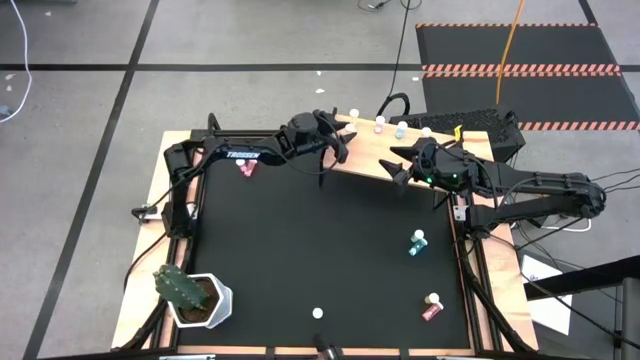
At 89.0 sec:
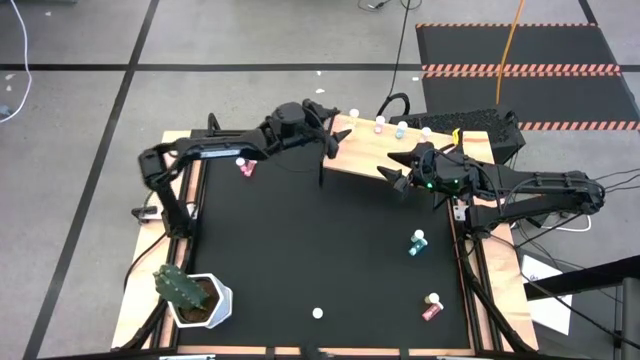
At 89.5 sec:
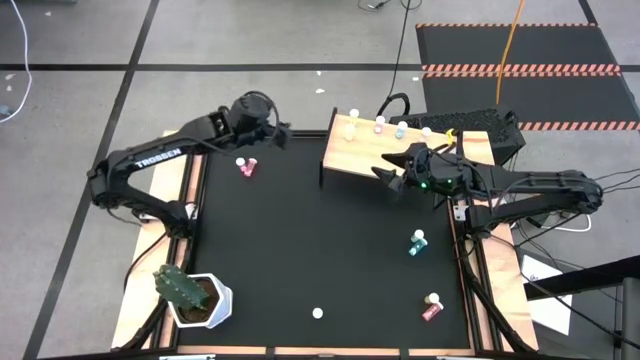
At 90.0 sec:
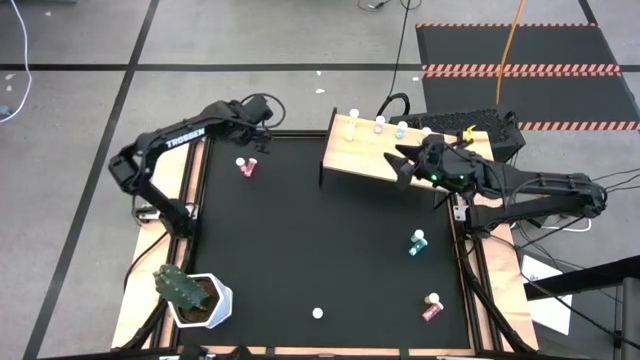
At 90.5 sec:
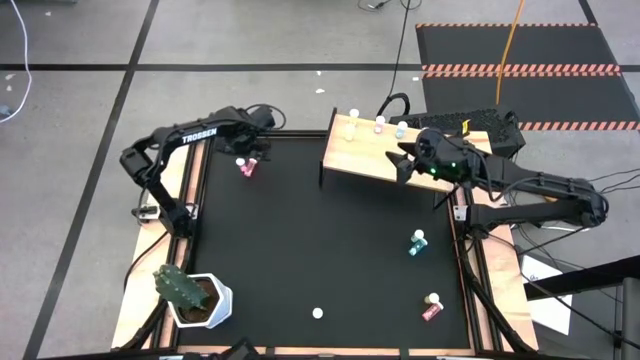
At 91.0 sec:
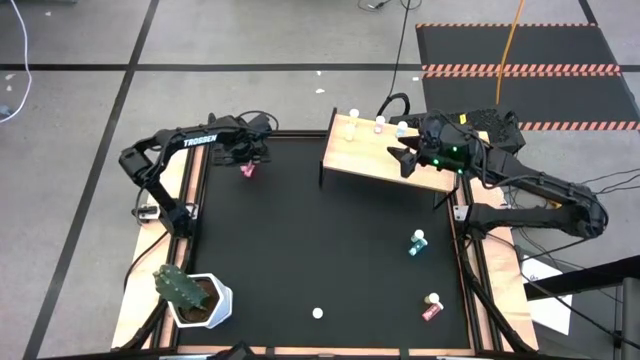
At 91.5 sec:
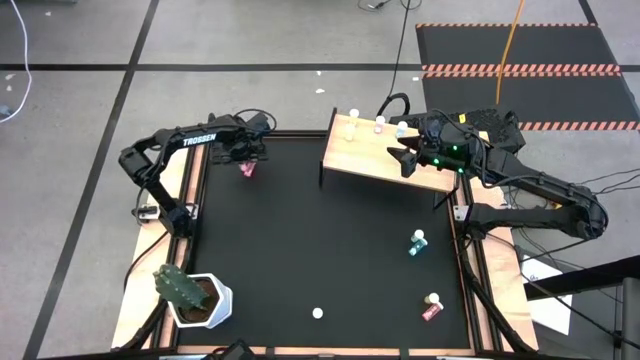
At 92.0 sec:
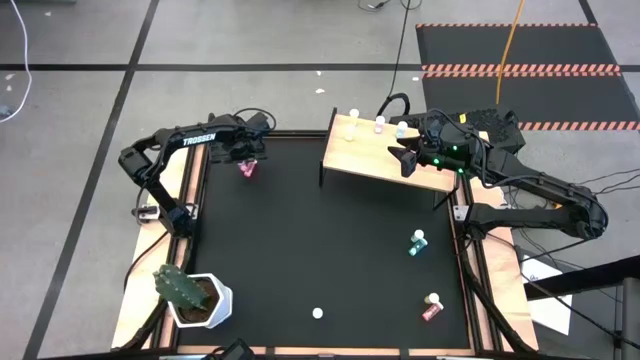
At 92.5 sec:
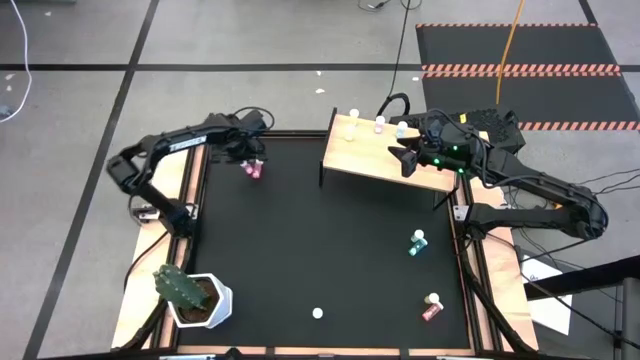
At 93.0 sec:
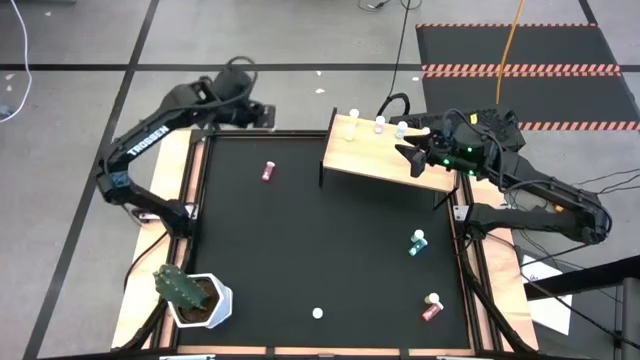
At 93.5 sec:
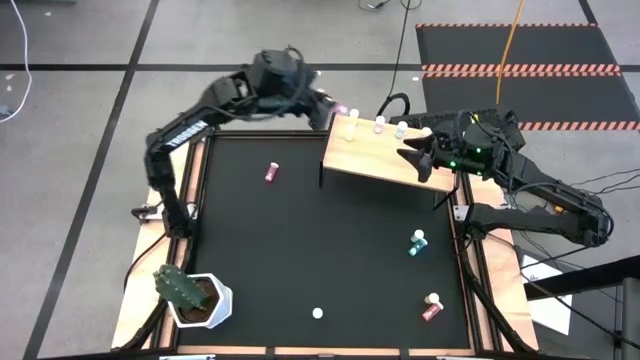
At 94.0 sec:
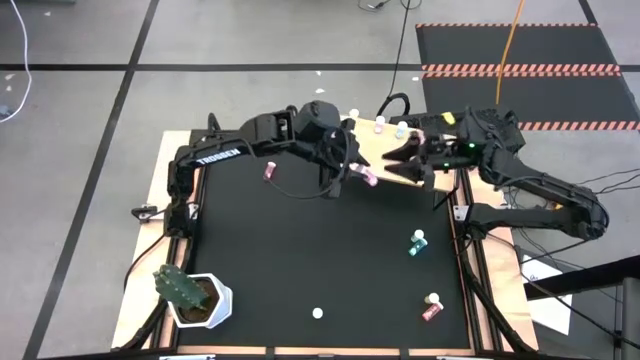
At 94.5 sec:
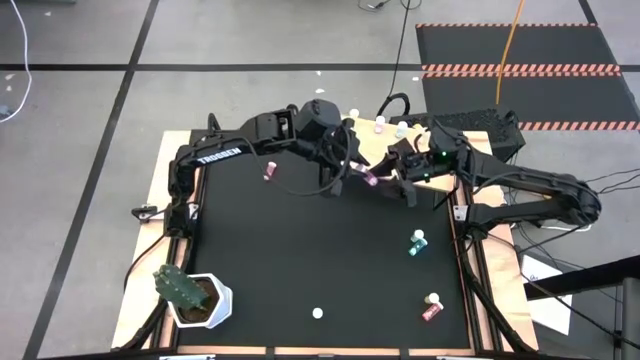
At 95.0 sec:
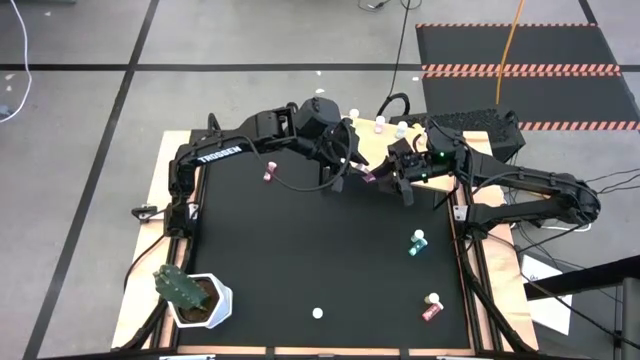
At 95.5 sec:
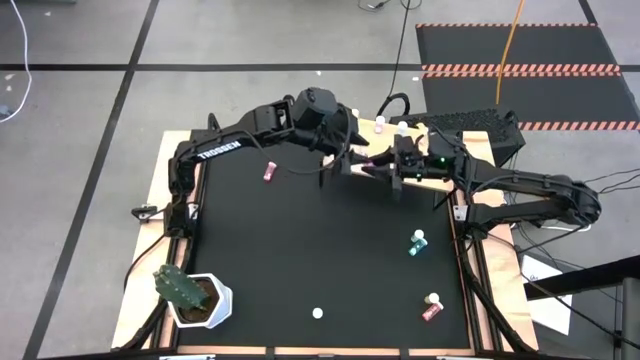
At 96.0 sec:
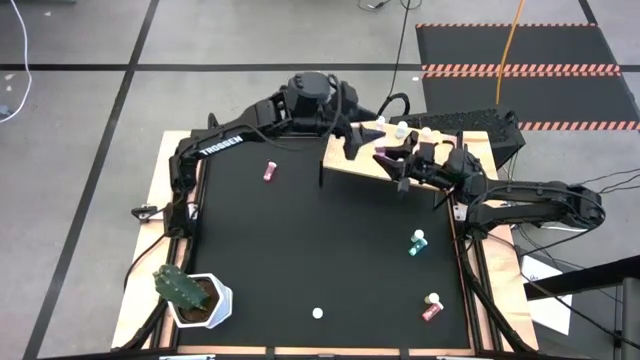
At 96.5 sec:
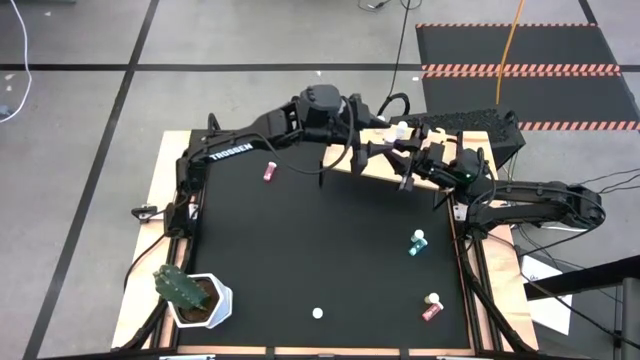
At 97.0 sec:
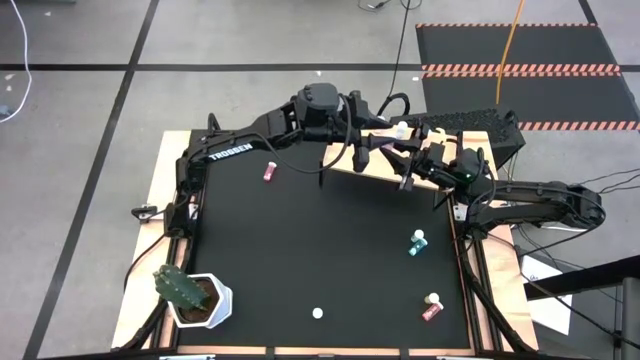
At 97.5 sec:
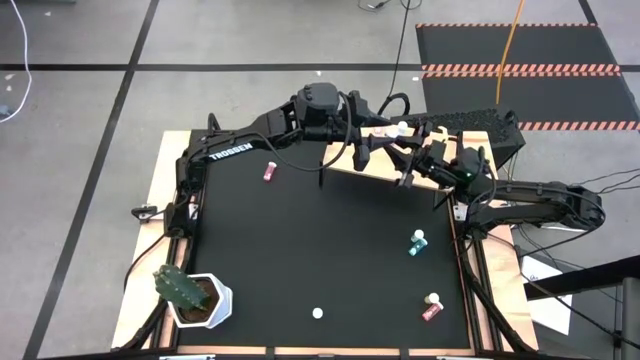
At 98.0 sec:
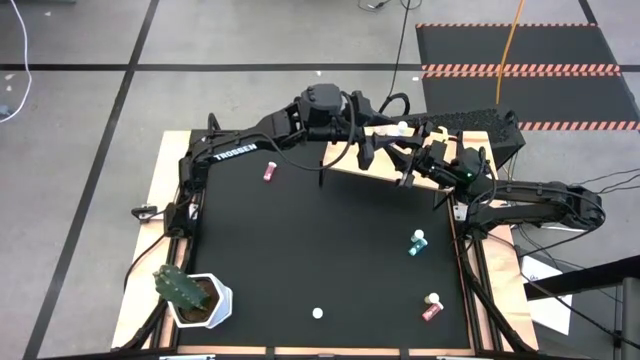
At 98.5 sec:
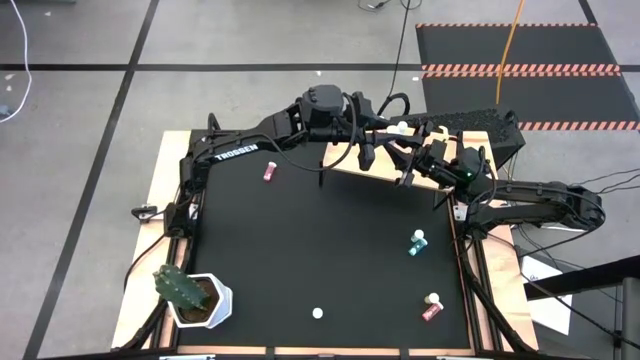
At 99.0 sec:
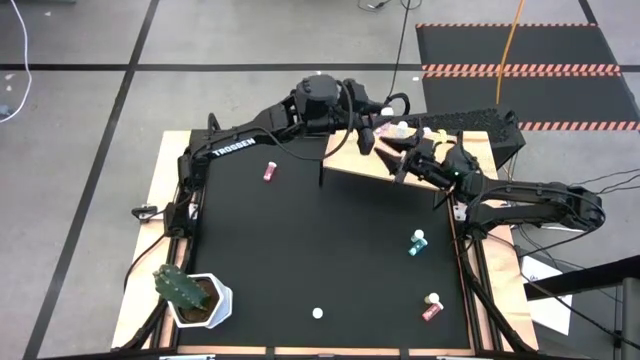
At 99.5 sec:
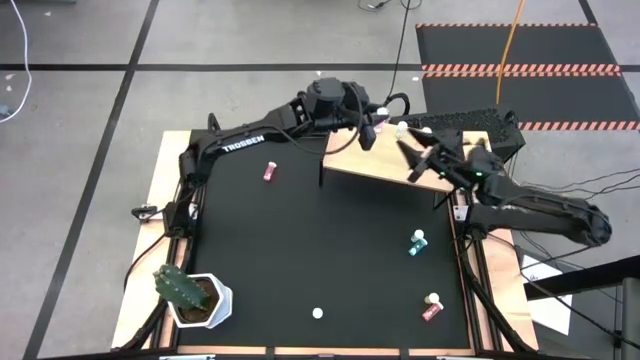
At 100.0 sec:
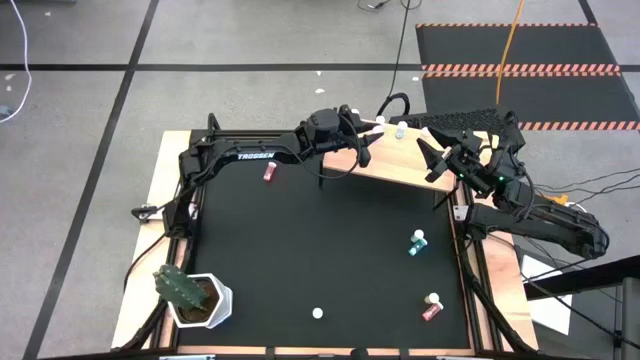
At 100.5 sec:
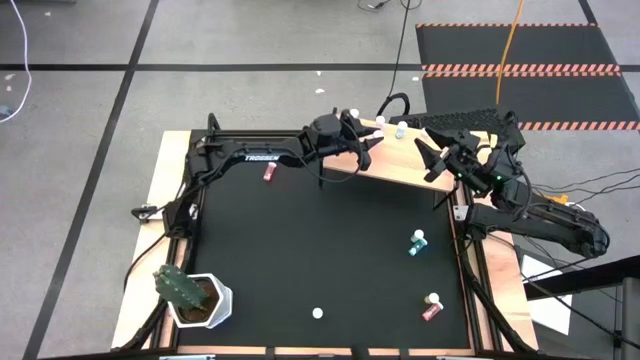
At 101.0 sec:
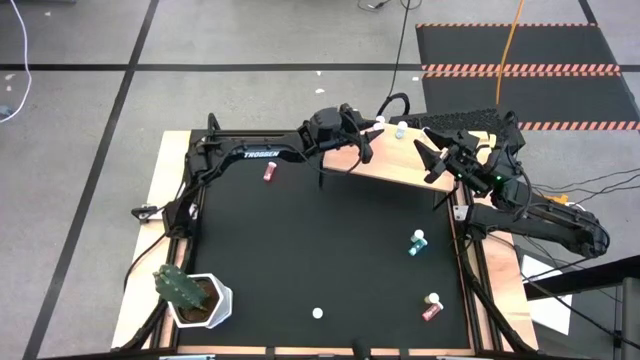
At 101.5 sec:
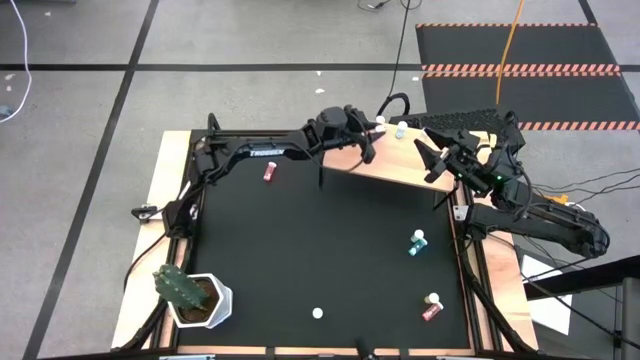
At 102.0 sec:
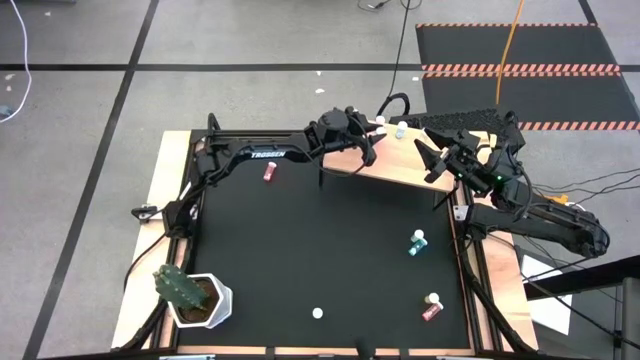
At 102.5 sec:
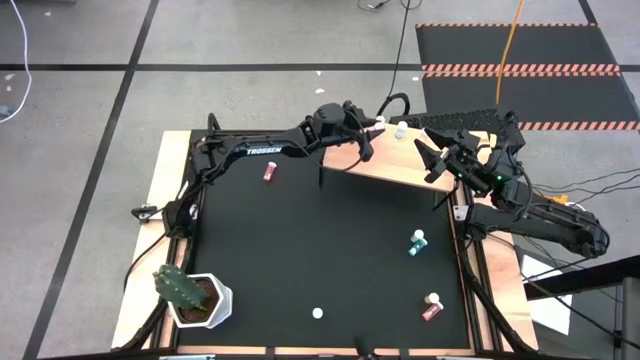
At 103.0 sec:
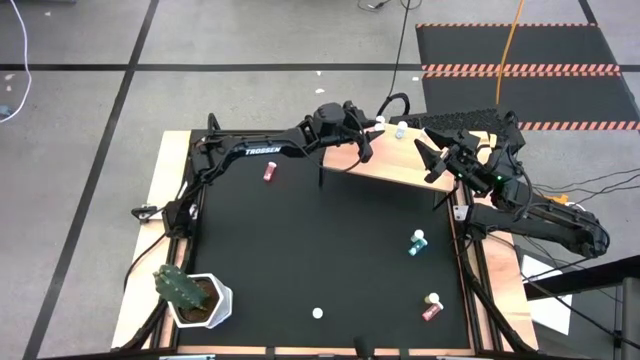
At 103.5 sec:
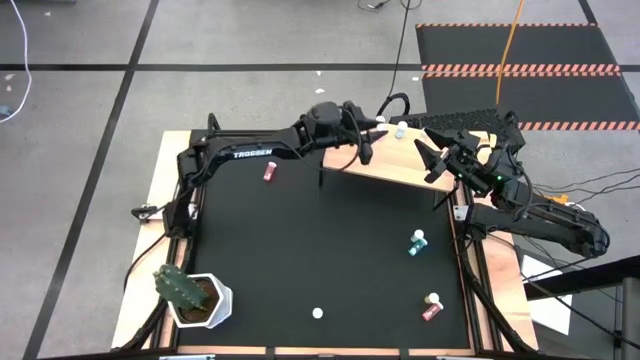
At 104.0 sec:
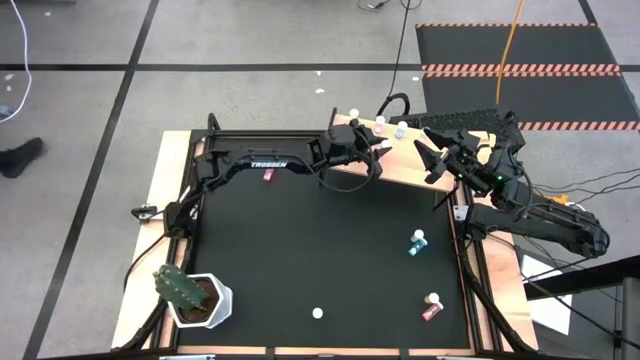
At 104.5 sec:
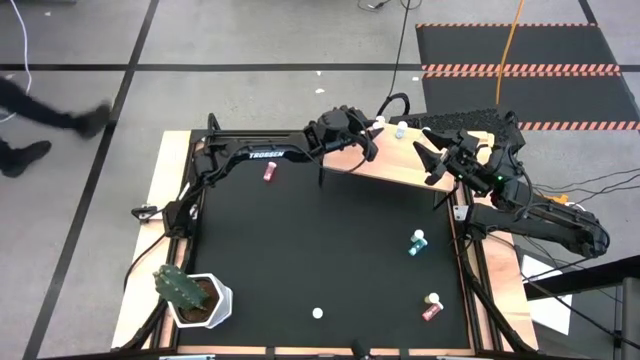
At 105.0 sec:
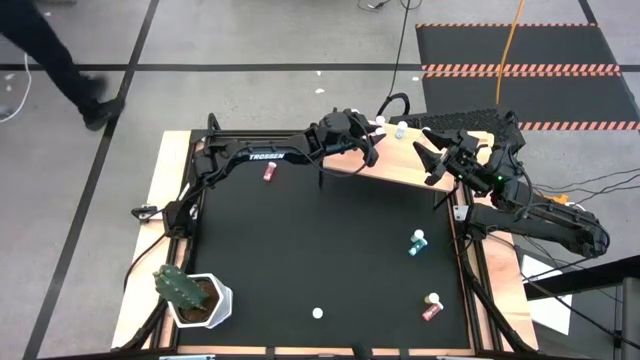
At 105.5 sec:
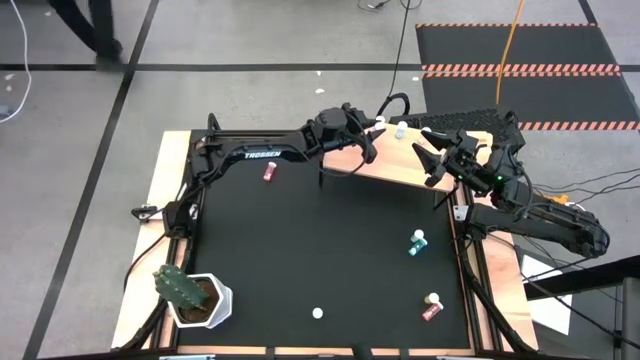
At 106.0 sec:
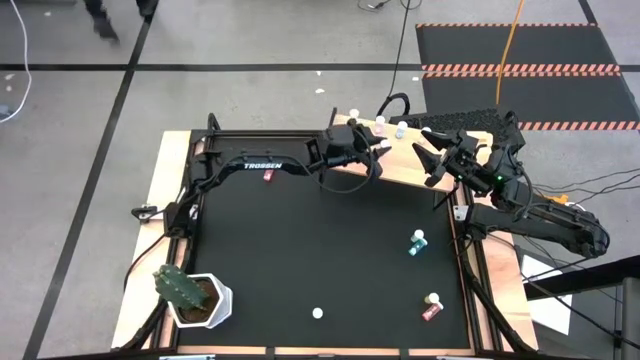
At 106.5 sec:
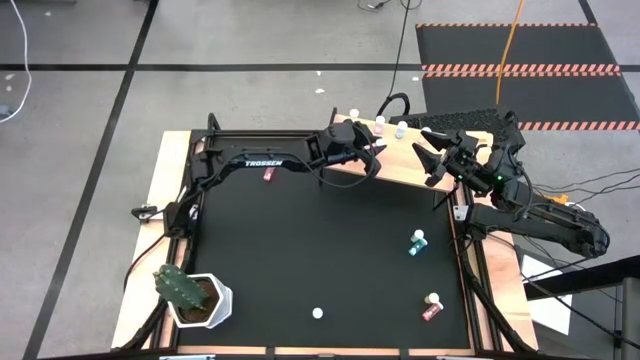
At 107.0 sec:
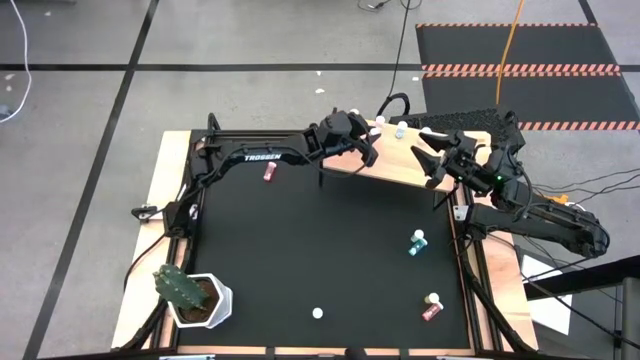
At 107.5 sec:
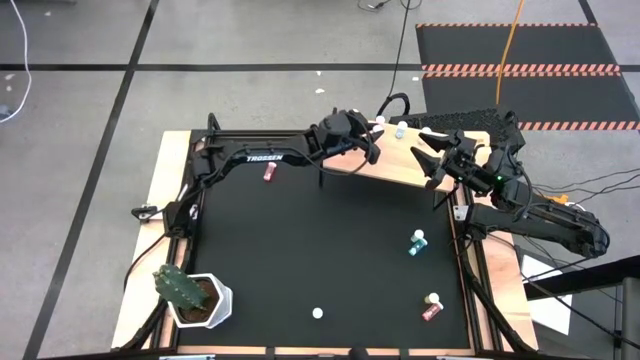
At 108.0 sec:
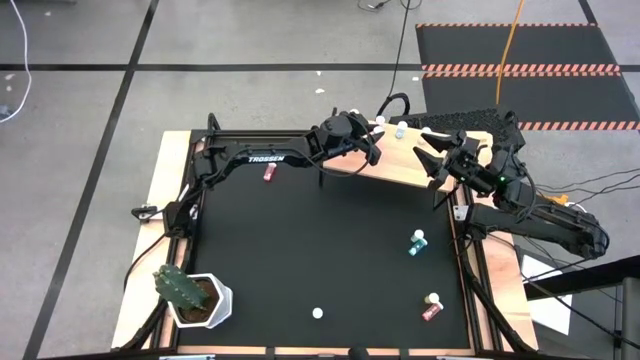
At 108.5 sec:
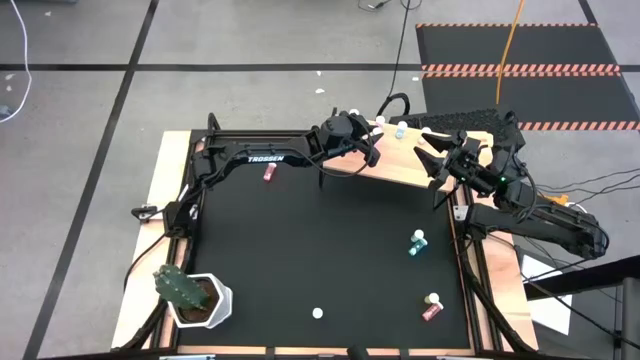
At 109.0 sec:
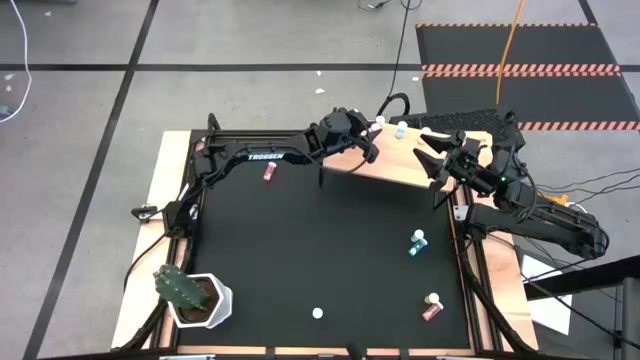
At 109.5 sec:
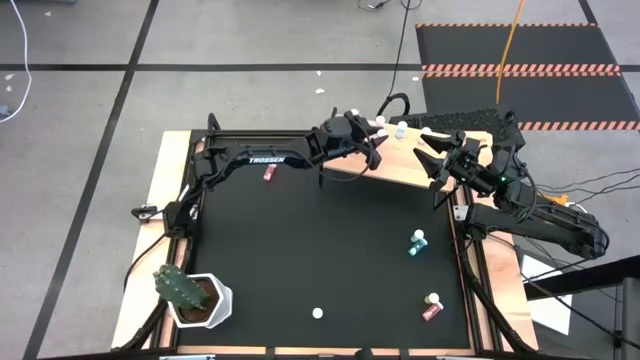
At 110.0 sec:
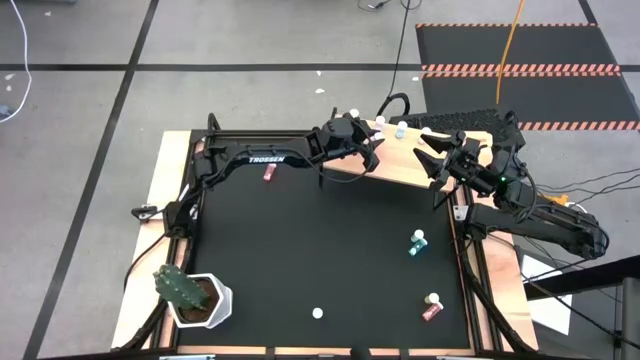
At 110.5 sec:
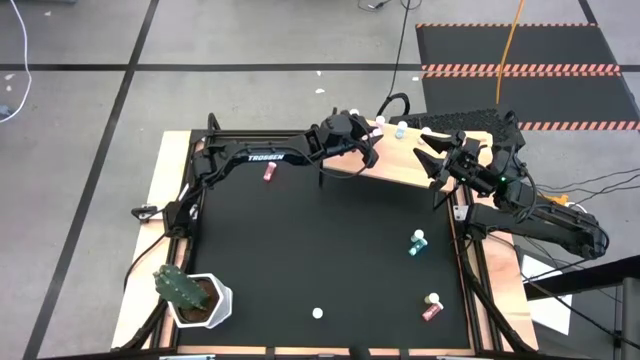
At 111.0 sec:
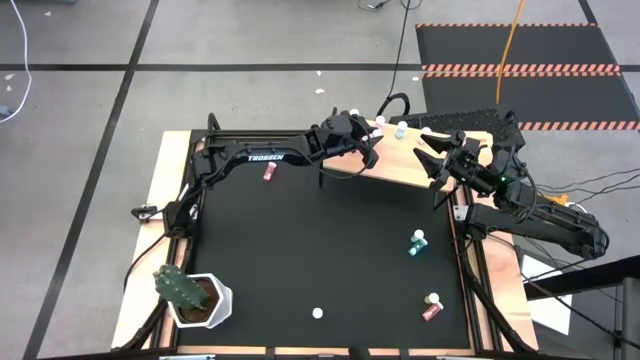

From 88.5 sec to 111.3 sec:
Task: Pick and place medicine bottles onto shelf by color
Put the top pink pill bottle on the shelf aligned with the other pink pill bottle
